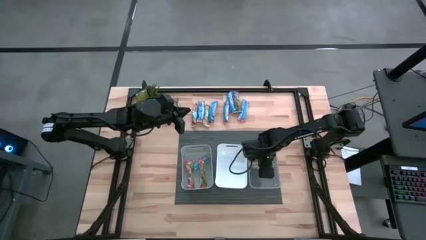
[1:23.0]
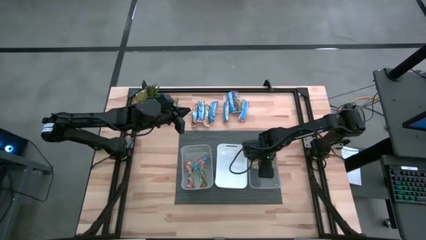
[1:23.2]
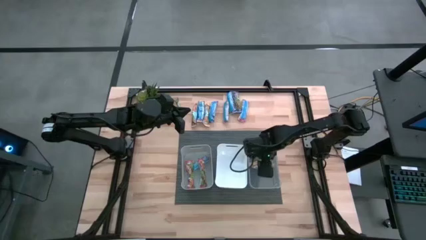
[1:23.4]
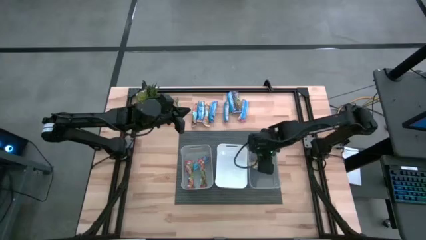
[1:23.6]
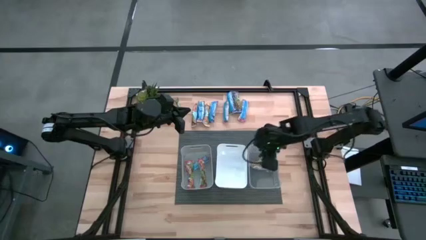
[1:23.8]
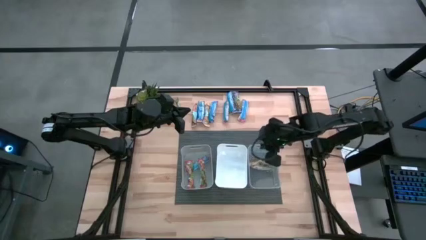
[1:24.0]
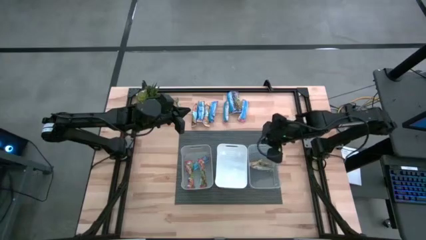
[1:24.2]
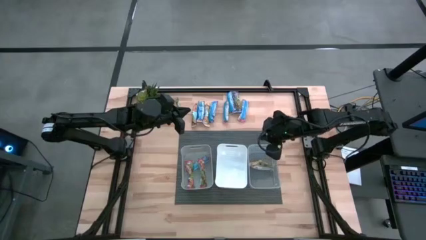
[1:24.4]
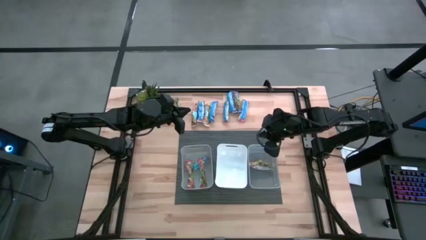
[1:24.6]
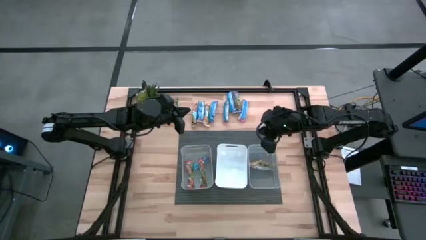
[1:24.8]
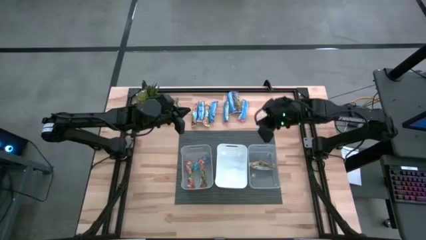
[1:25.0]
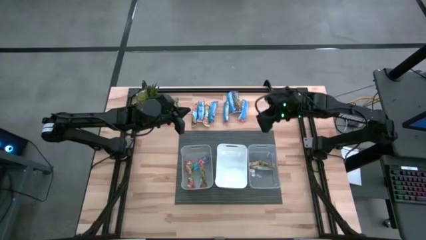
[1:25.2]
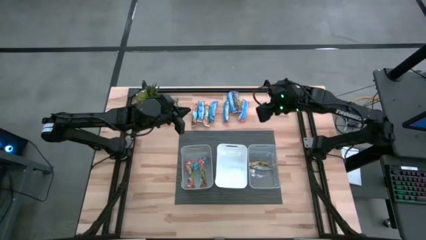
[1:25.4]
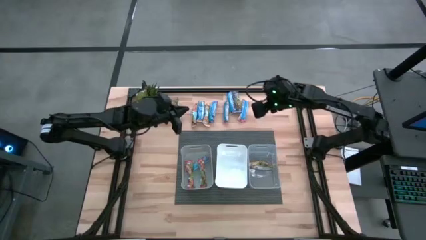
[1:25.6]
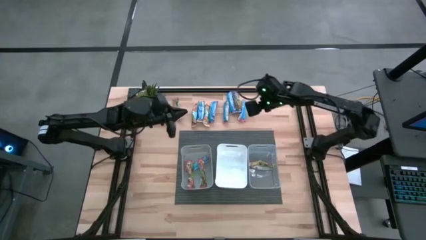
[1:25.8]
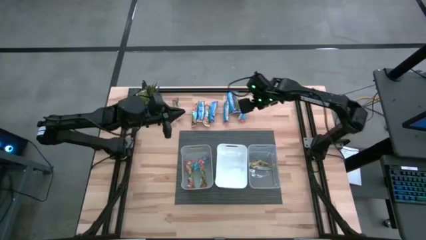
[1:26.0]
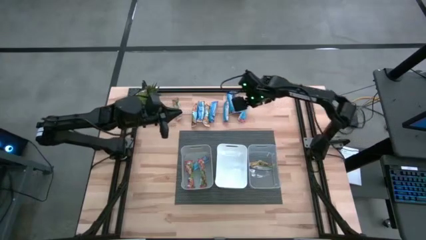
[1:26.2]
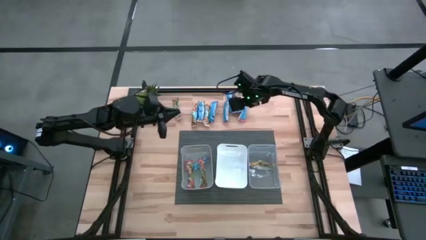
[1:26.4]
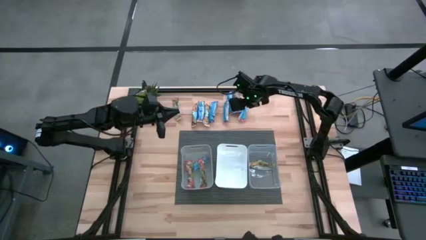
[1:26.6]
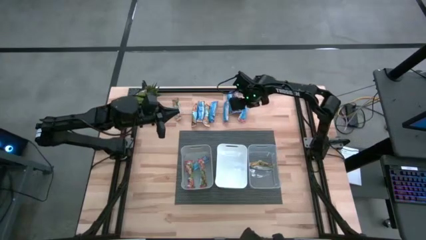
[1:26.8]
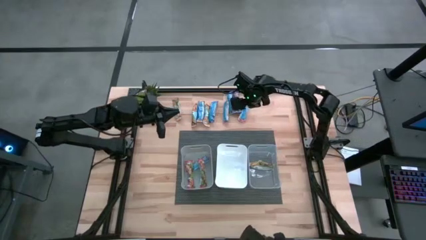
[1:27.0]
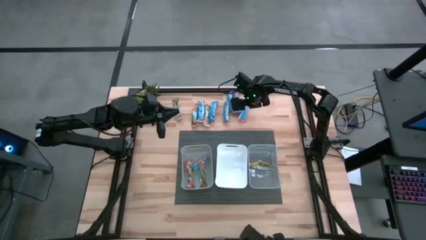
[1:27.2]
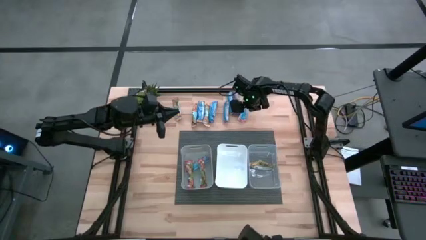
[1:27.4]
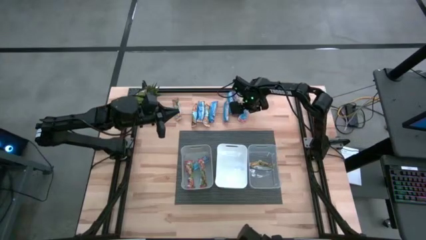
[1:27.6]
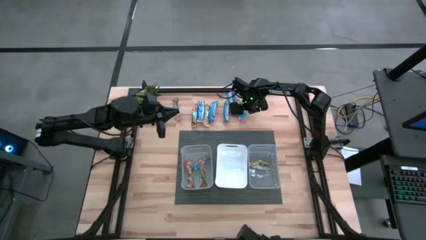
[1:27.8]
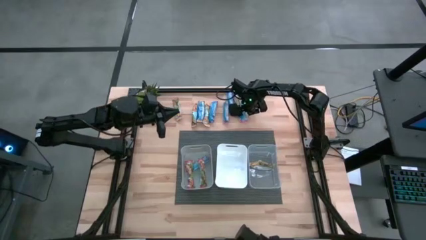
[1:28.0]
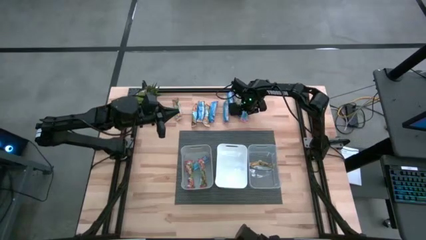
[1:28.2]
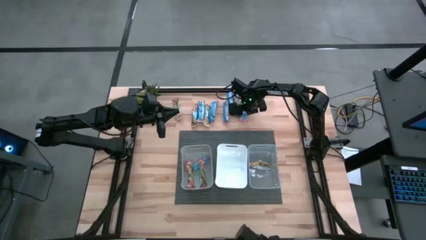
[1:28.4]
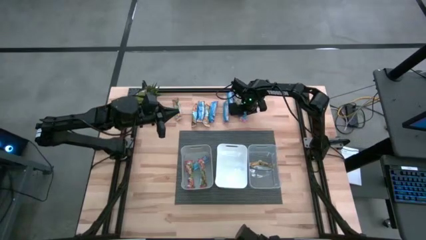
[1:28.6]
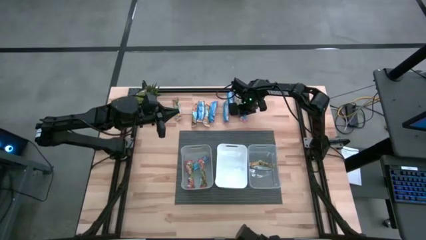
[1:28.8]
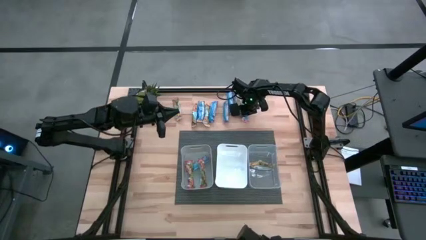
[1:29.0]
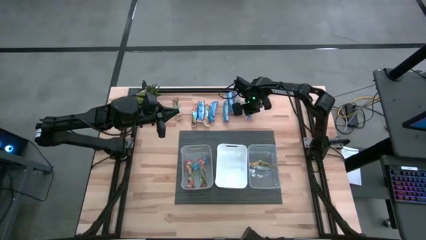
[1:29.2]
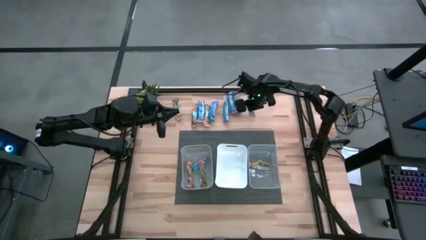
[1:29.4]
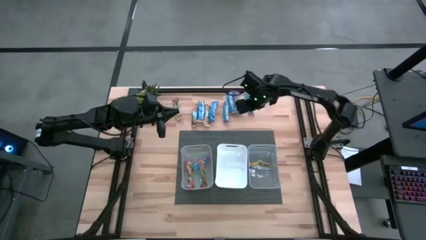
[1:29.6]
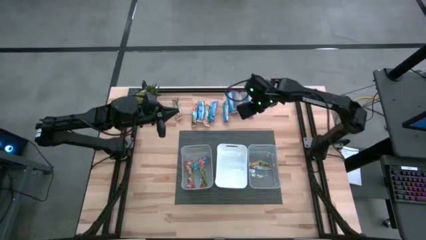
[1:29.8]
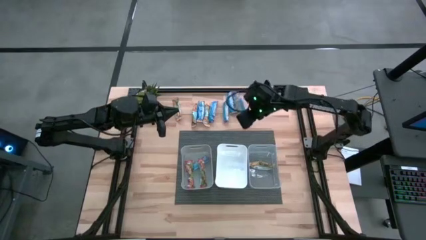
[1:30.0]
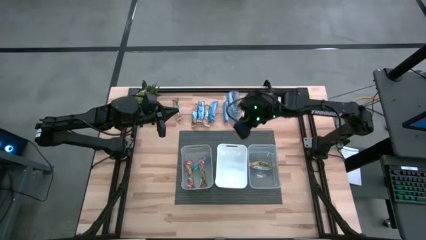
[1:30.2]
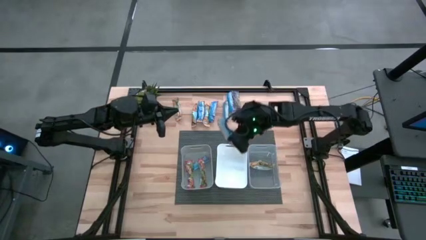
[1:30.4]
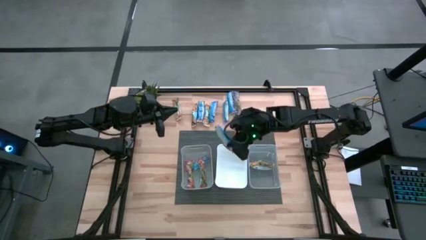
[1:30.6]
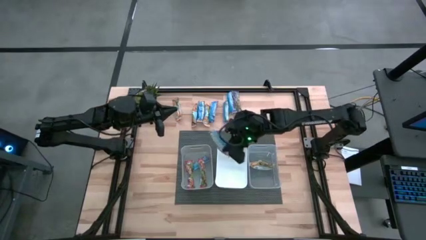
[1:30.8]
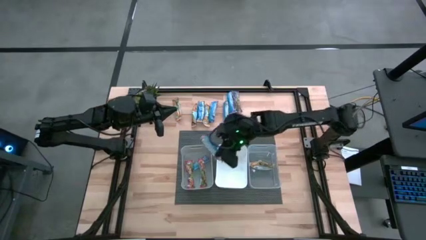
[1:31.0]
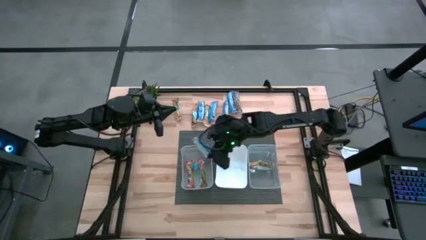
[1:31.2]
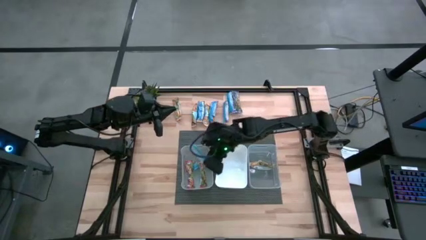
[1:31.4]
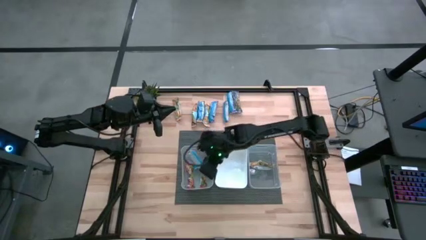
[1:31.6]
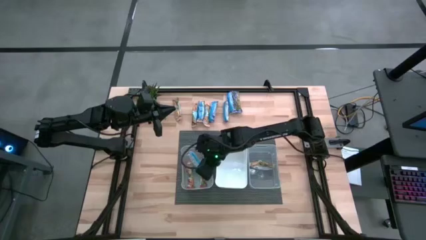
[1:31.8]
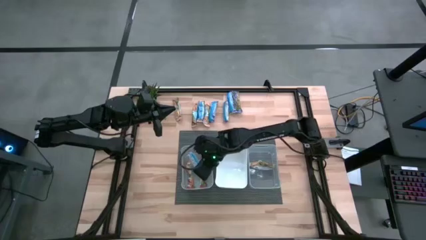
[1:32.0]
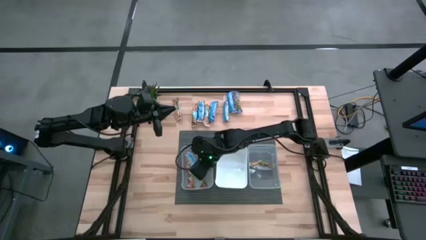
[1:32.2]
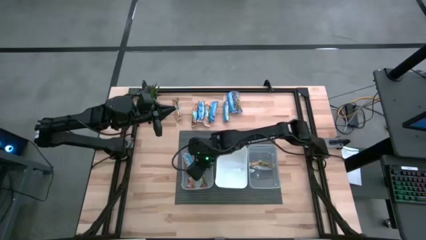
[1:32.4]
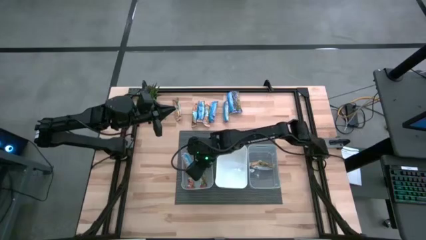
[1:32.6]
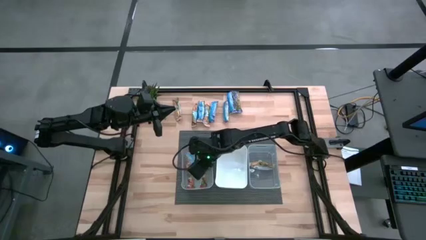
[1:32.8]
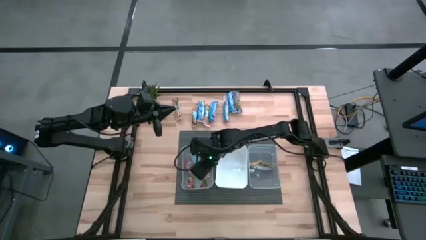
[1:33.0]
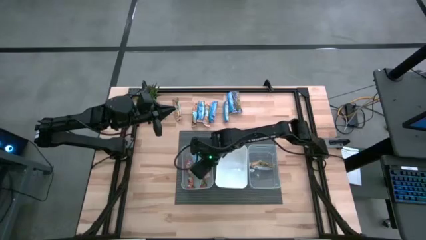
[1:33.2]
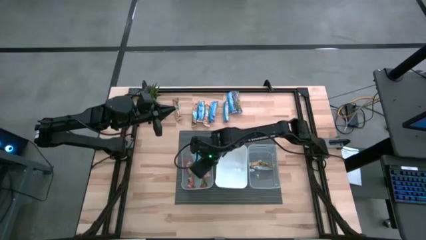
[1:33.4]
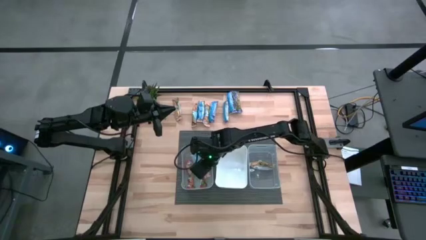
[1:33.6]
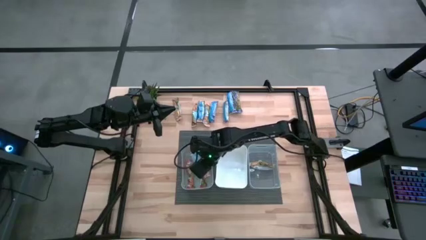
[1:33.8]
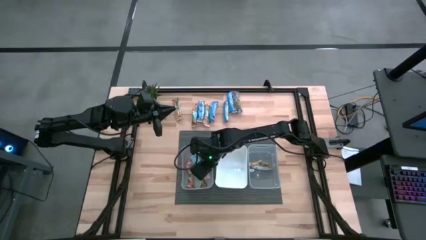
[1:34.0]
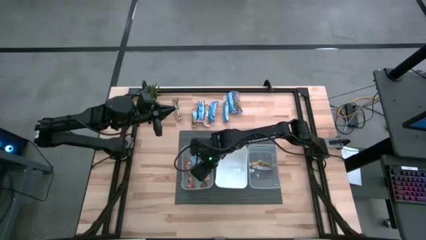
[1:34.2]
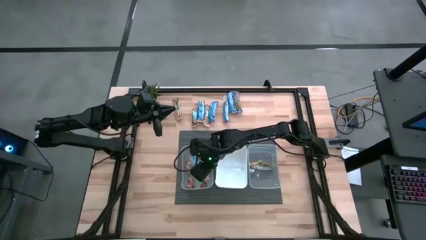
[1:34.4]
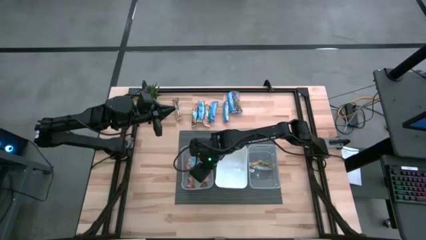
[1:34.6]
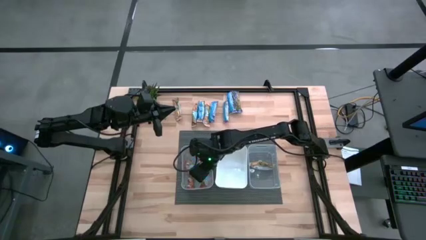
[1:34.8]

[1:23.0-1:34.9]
Task: Pick and place Granola Bars by type
Put the red granola bar into the gray bin

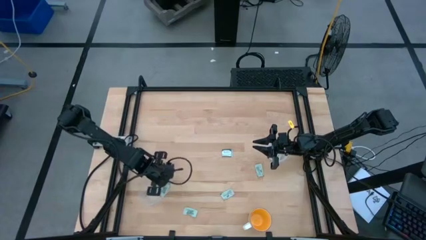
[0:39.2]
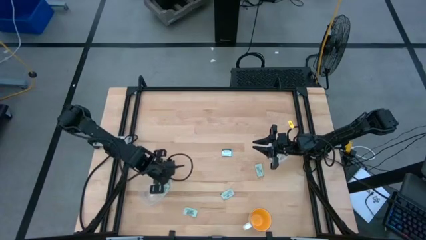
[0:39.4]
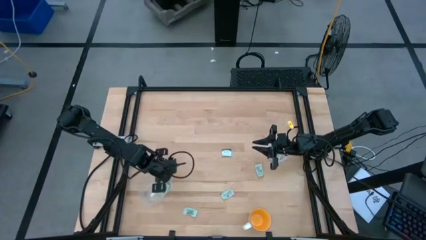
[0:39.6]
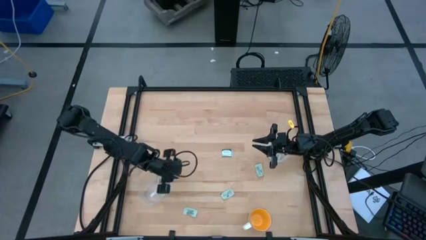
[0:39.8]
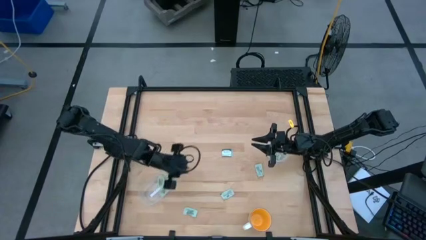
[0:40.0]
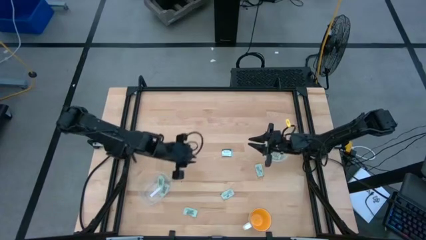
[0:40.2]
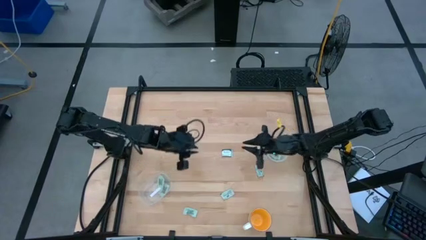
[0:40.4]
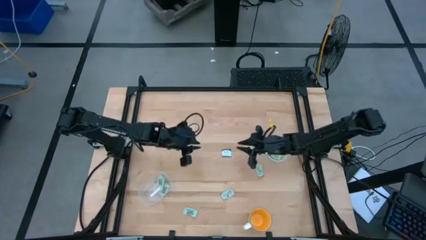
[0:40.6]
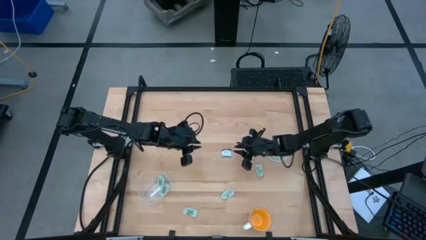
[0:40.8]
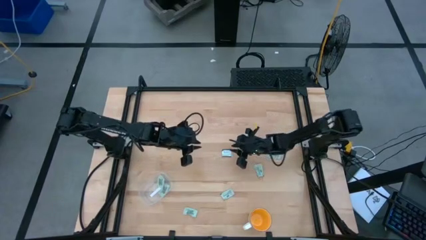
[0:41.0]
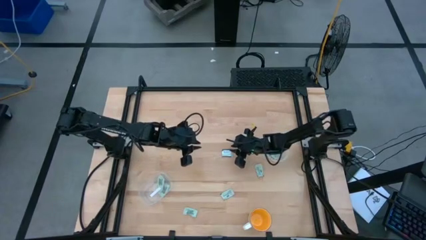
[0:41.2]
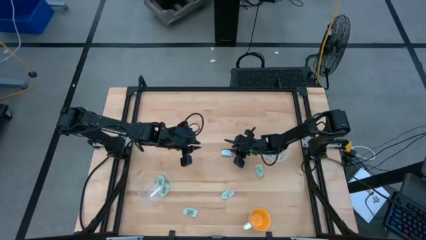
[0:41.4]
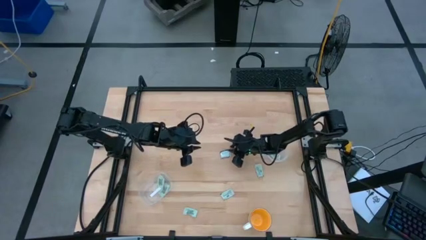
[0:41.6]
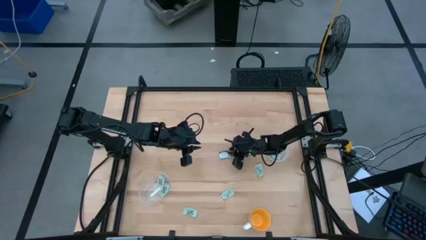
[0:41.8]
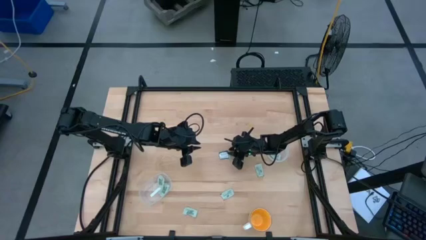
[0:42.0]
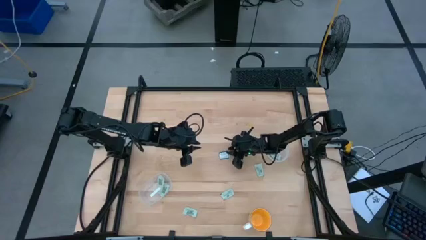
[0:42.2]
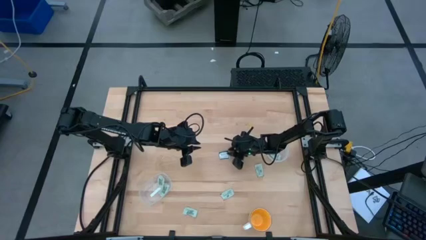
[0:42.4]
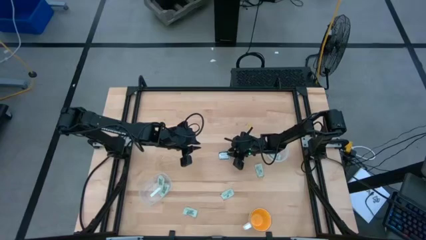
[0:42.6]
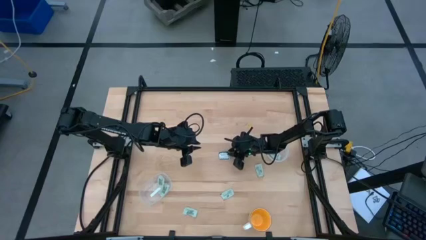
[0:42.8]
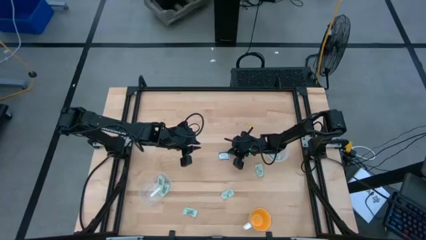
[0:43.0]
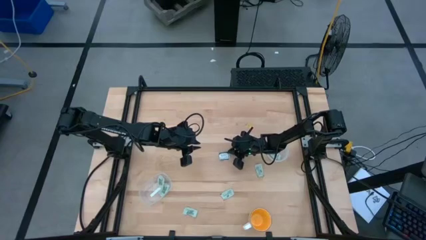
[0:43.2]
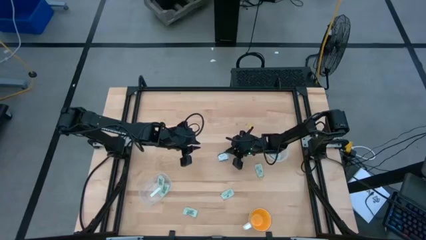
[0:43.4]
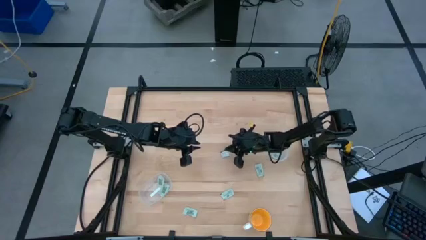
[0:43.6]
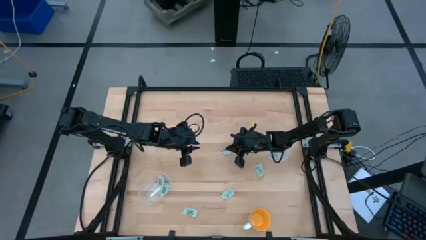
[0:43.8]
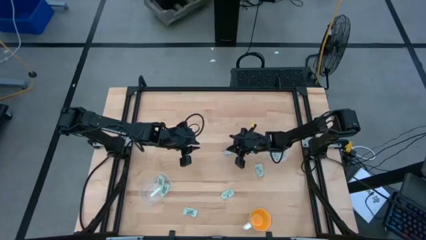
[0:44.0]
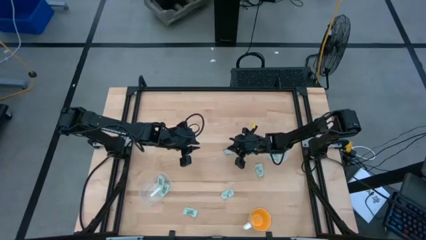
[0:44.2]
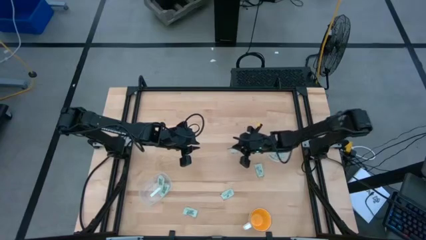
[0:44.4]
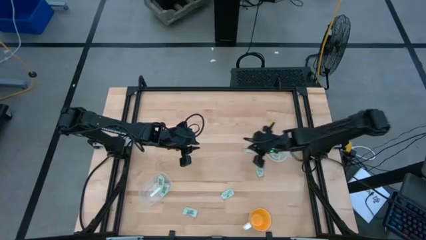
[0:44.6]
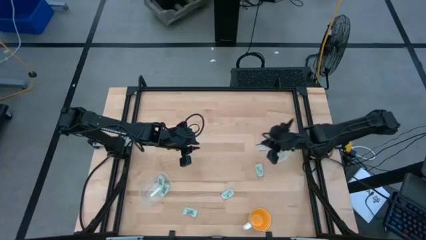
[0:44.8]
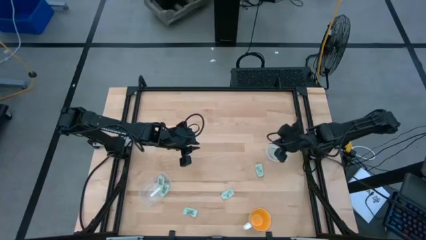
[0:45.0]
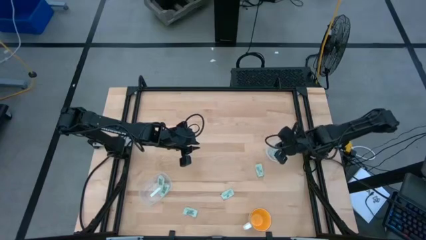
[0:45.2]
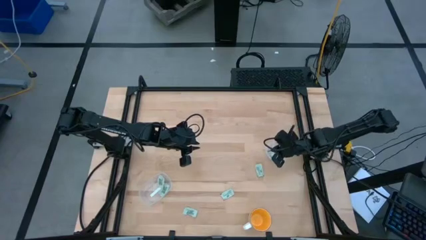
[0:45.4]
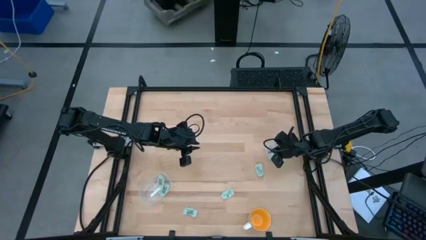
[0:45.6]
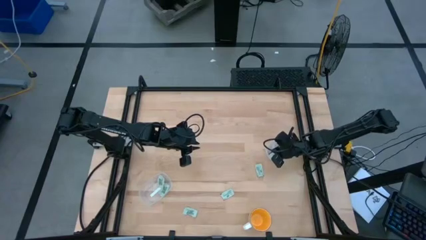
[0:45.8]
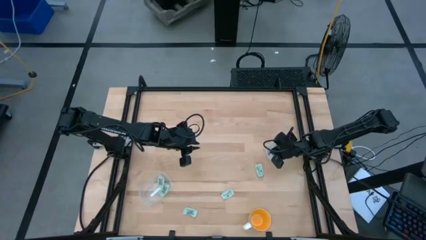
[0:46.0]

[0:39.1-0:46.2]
Task: Pick and place Stevia / Truvia into bins
Put the green truvia packet into the circle transparent container
